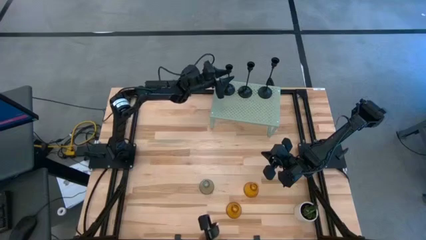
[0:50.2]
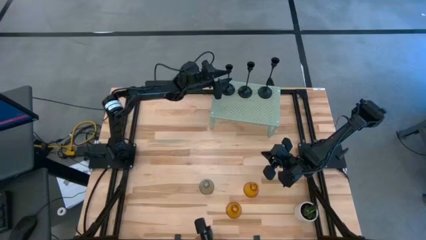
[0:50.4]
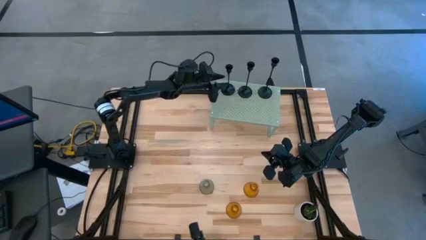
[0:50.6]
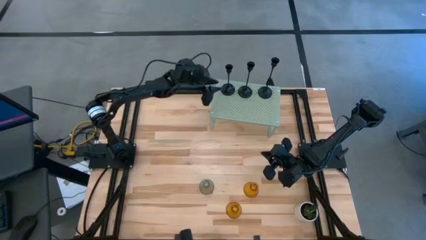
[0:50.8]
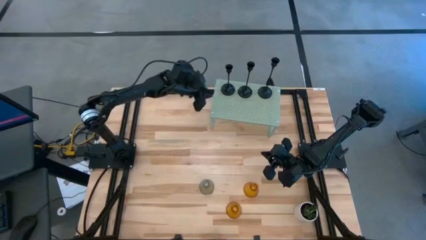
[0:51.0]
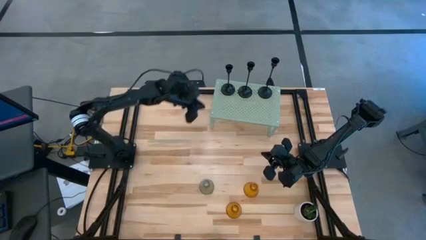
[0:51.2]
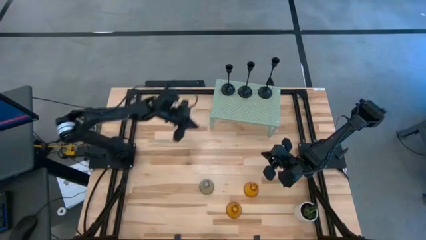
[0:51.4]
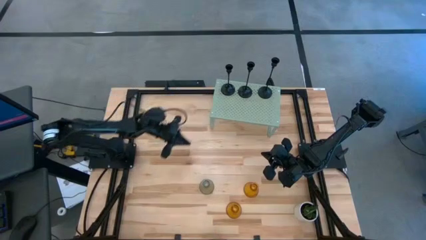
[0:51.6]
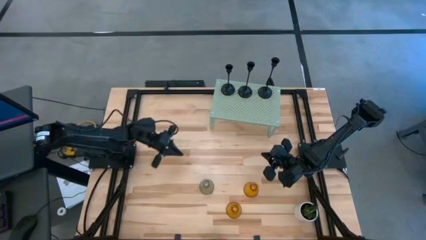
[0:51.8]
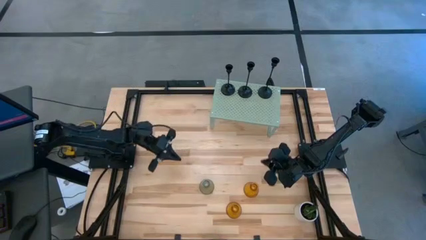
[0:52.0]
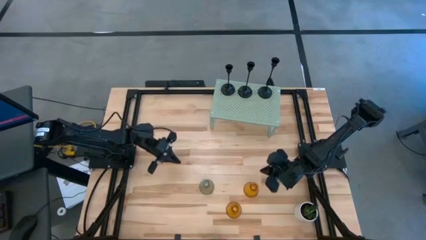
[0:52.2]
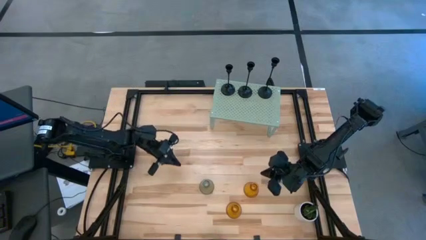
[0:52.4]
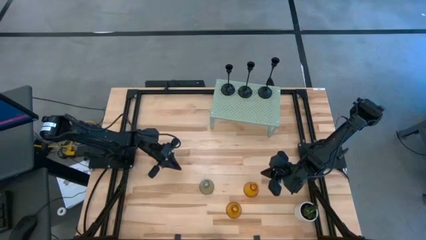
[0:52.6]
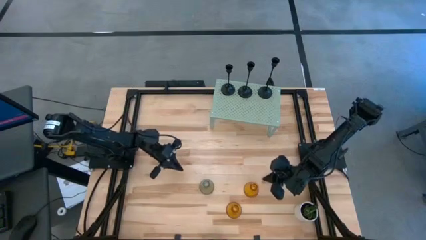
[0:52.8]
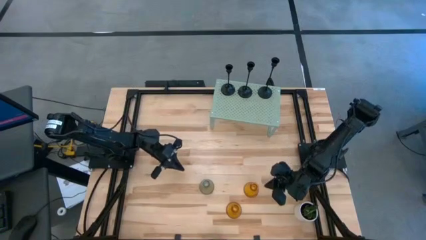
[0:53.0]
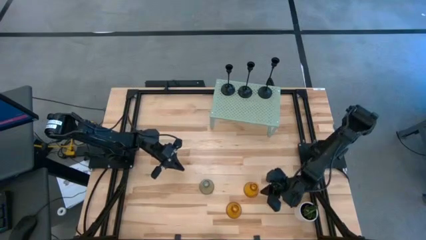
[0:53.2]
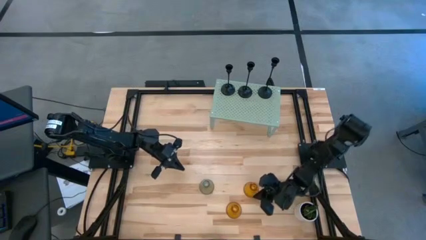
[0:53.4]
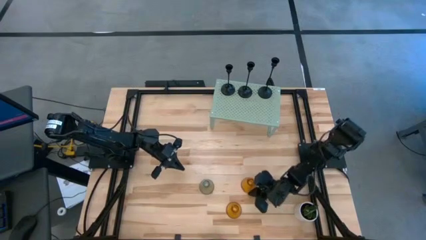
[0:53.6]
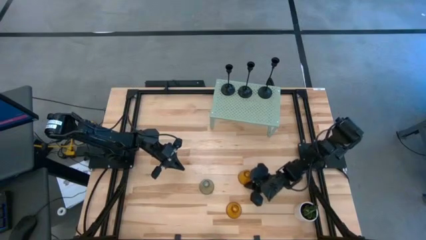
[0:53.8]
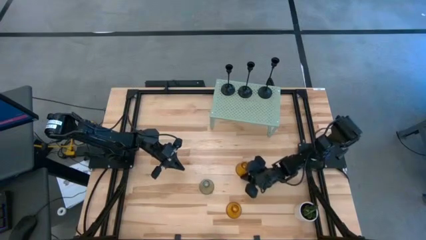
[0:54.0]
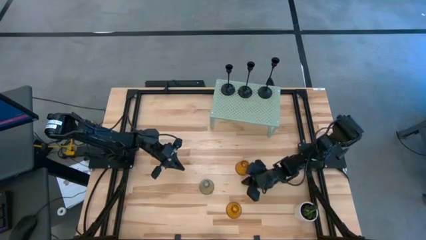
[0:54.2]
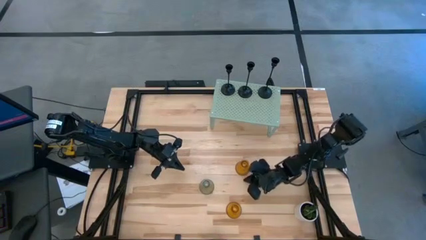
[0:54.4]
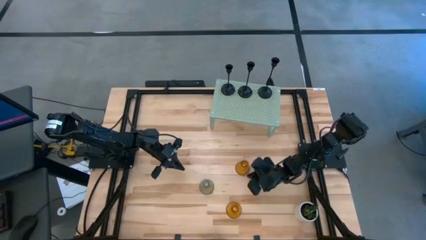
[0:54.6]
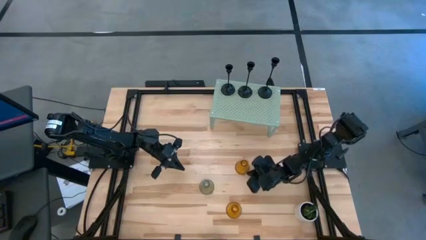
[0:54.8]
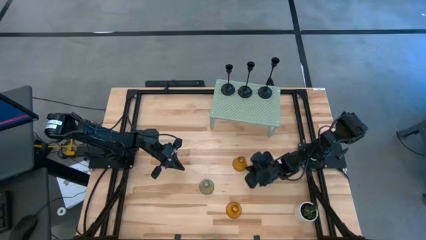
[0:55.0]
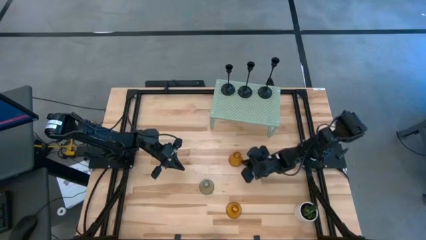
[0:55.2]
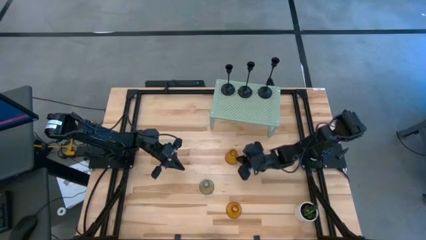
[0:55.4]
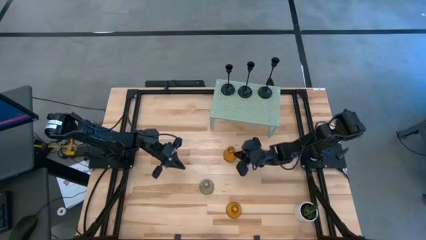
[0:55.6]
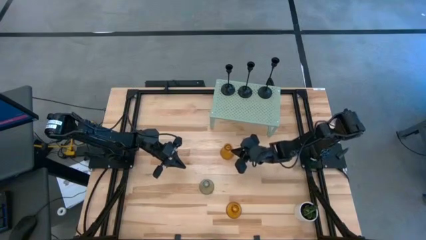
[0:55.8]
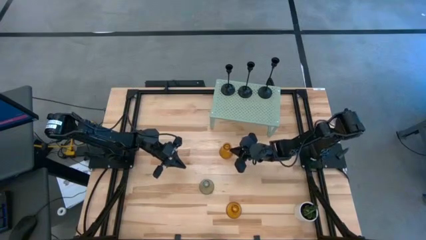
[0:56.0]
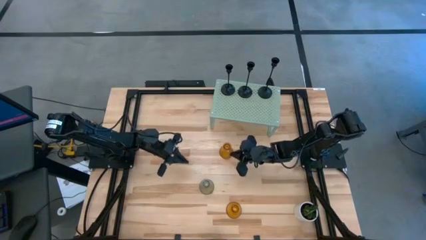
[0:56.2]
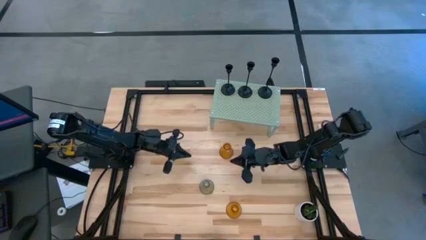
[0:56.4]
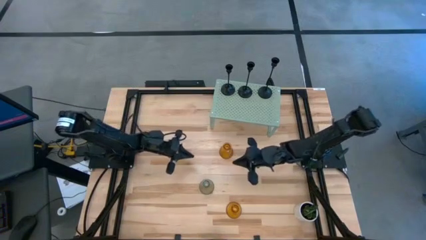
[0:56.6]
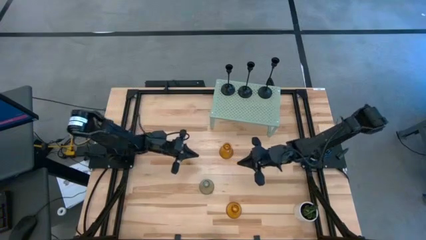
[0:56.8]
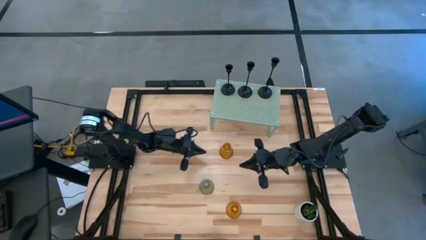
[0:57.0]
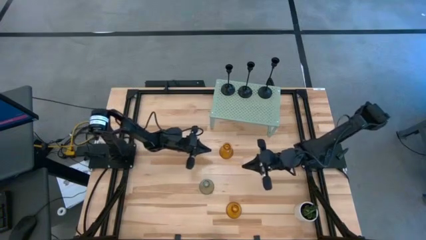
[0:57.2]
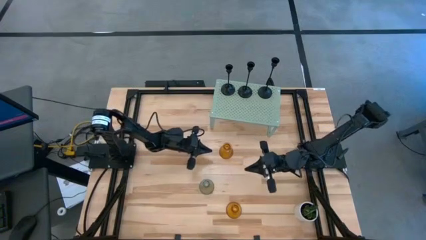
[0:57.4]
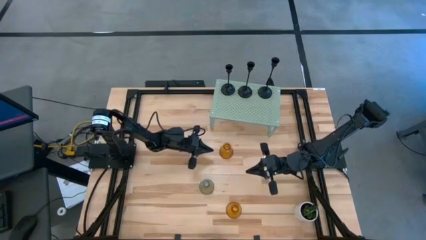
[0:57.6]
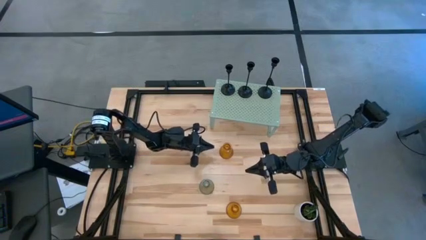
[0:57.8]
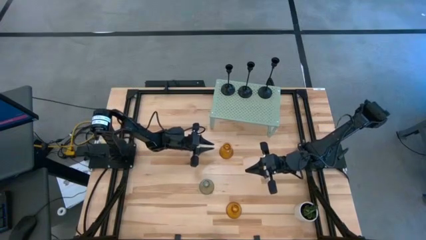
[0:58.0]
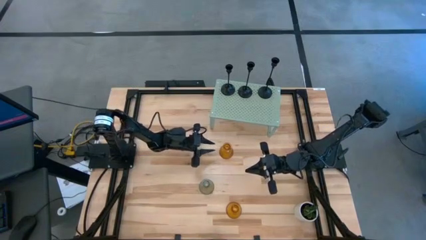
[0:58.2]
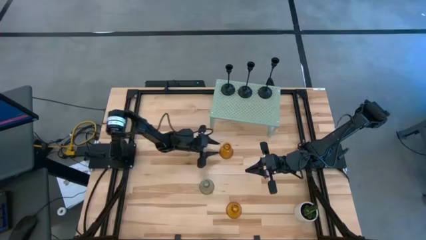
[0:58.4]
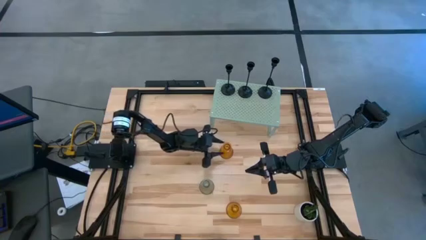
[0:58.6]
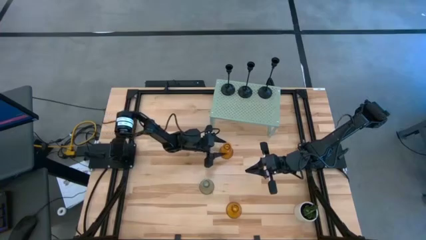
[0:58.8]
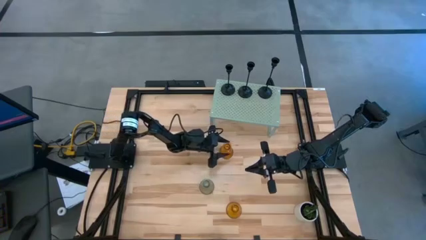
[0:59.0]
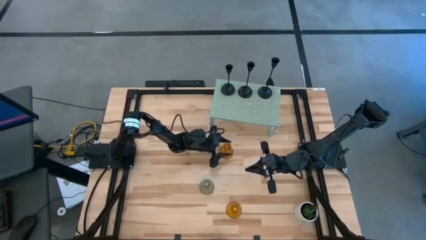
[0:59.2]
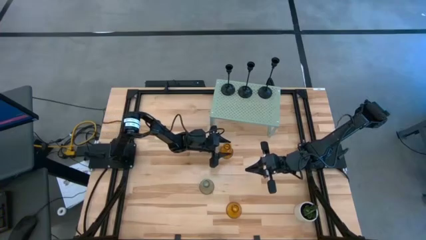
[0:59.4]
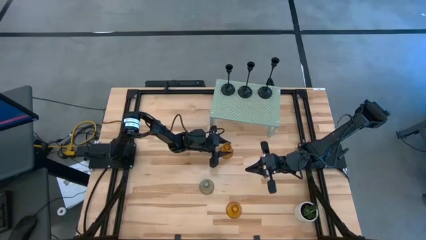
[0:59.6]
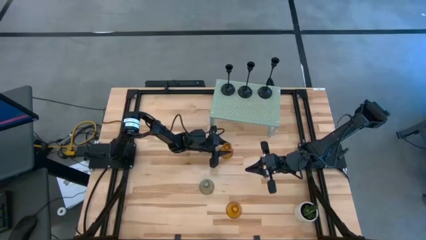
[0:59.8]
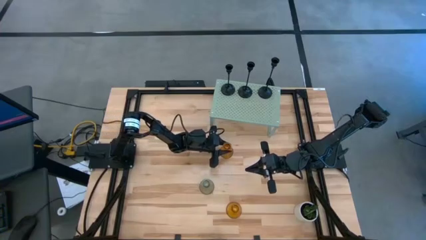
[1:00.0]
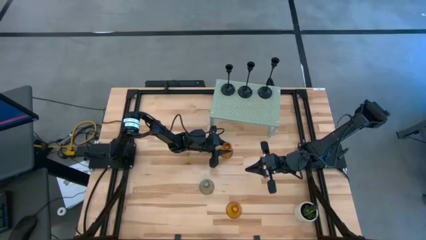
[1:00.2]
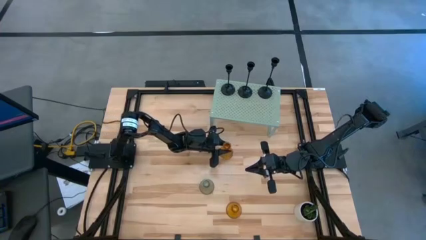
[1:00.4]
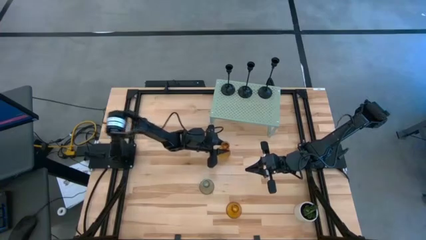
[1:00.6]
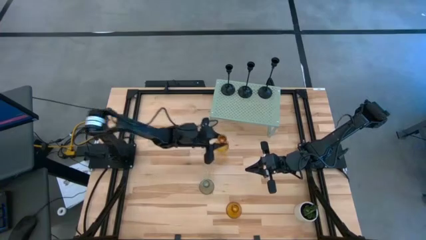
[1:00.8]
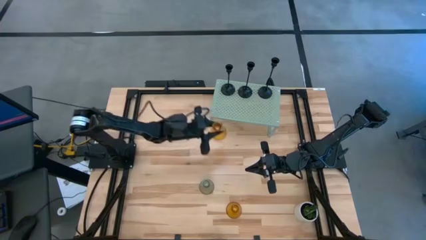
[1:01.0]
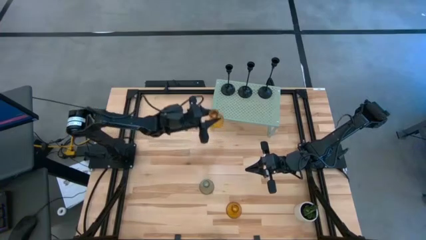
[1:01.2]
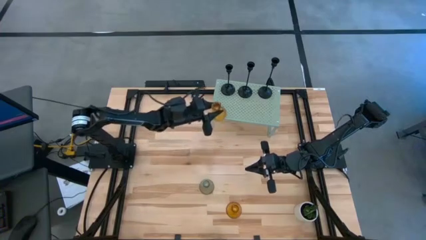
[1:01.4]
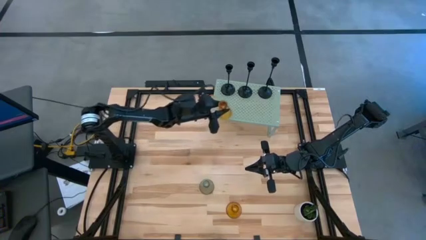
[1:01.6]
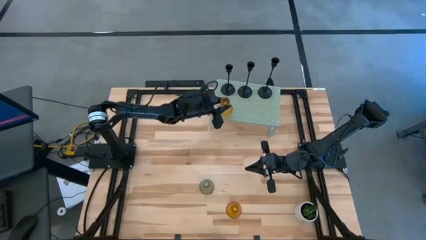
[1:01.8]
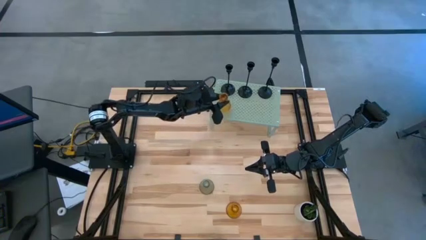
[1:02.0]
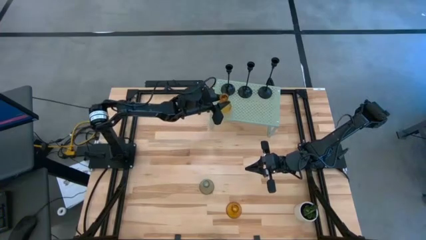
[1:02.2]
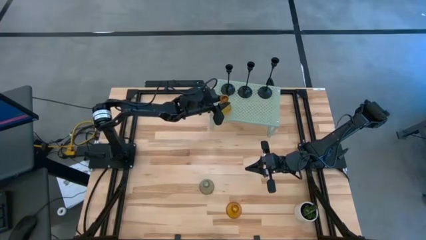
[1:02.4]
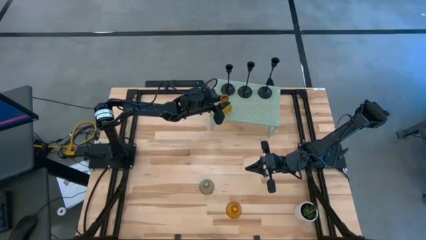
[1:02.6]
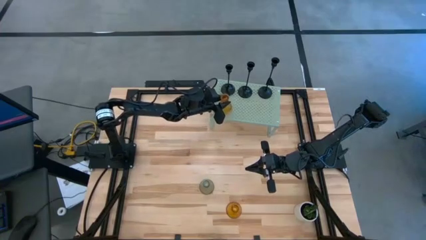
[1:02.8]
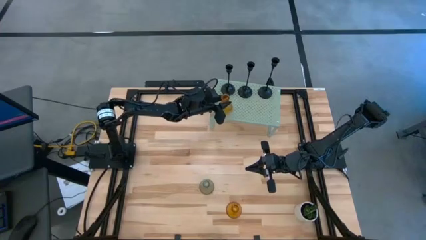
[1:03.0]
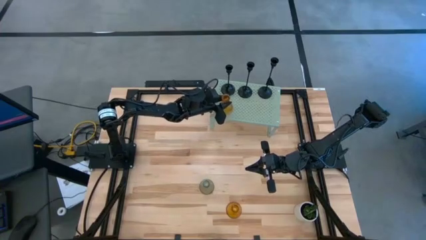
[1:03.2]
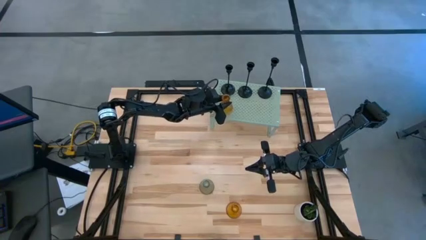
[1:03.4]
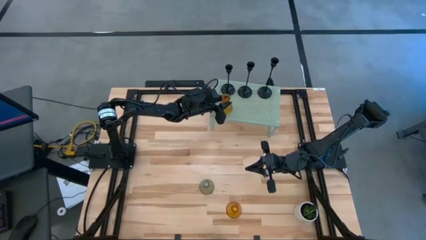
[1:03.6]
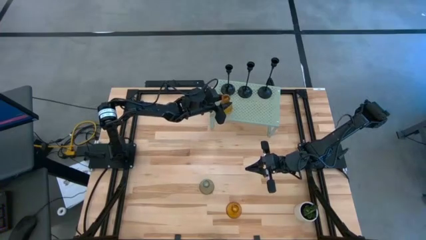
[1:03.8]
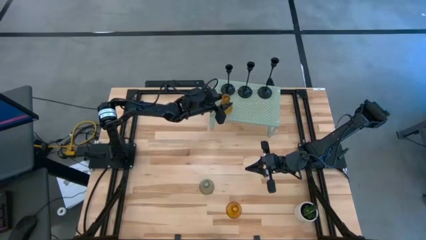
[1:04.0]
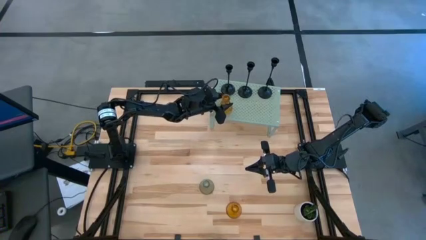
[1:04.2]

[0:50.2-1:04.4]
Task: Pick & Place candle stick holders
Put the top orange glass candle holder on the shelf
